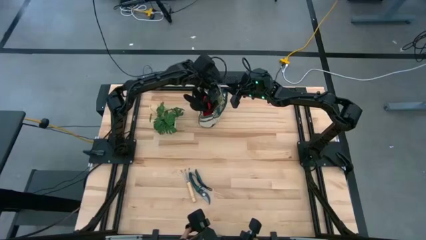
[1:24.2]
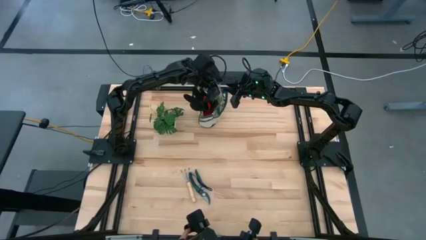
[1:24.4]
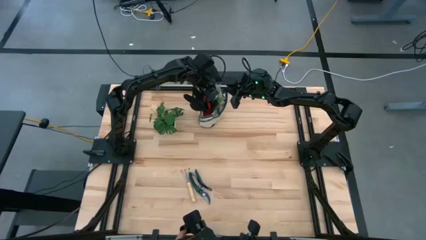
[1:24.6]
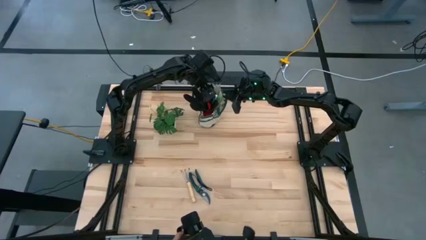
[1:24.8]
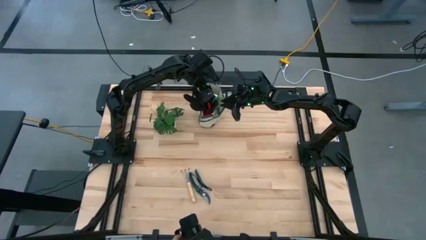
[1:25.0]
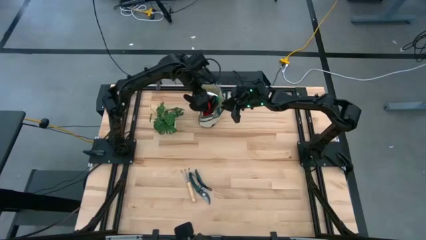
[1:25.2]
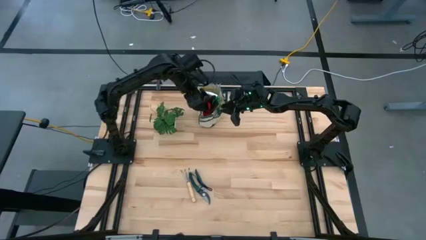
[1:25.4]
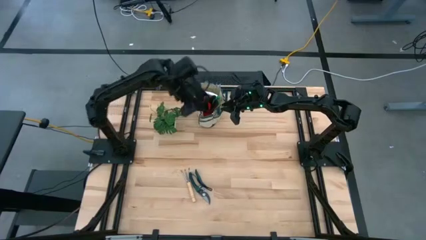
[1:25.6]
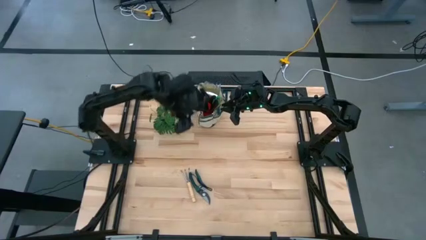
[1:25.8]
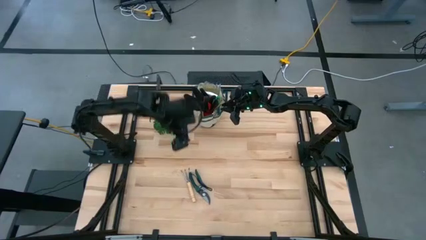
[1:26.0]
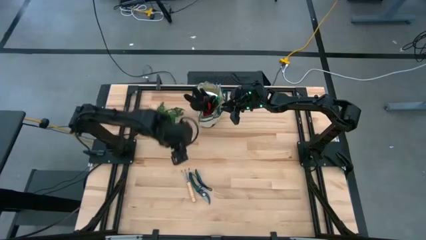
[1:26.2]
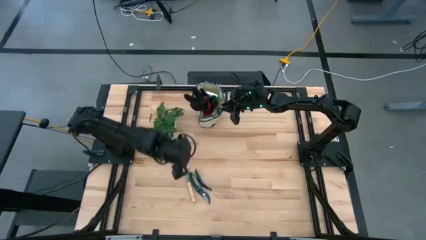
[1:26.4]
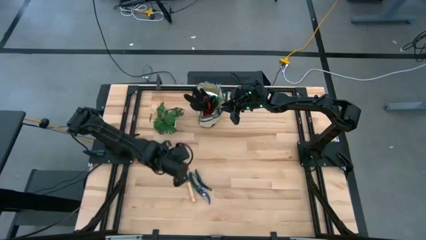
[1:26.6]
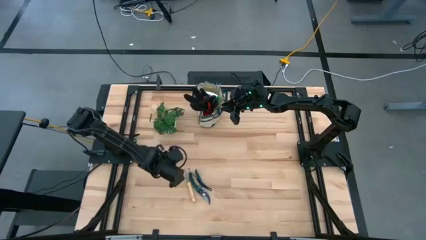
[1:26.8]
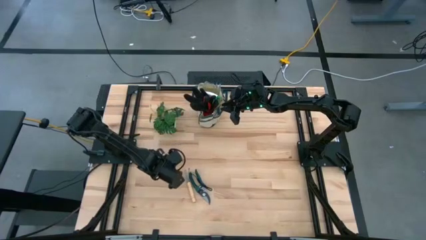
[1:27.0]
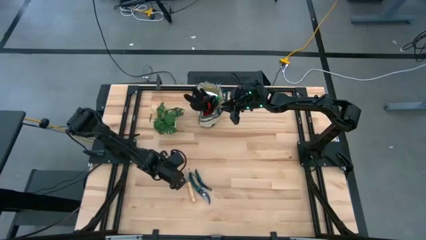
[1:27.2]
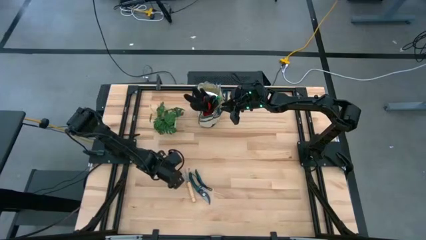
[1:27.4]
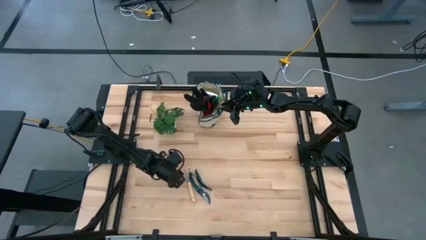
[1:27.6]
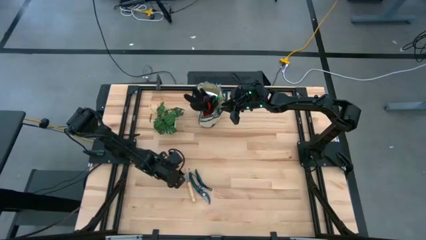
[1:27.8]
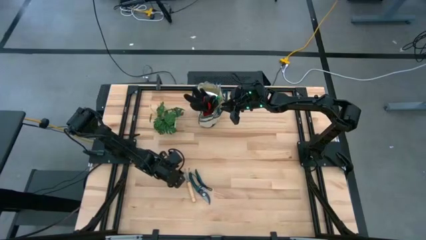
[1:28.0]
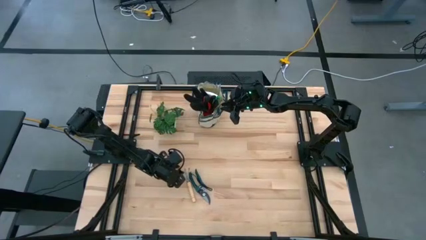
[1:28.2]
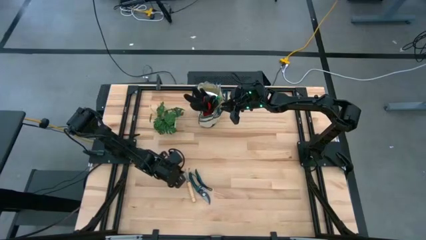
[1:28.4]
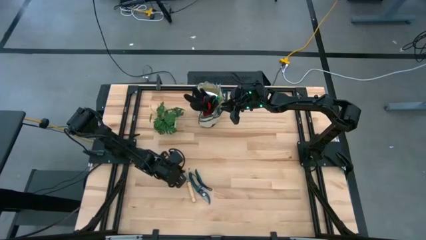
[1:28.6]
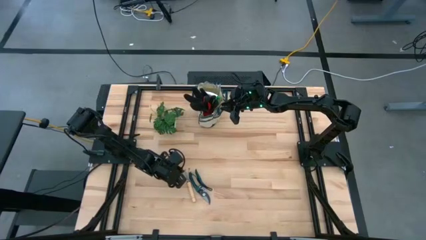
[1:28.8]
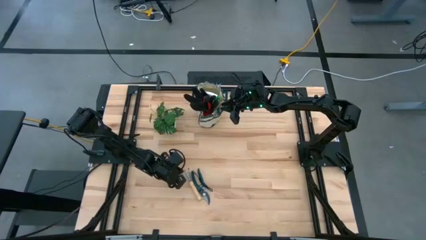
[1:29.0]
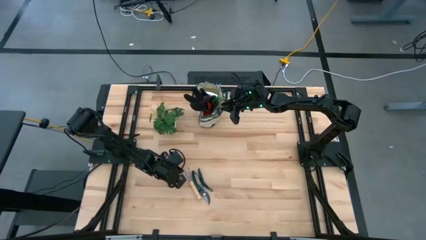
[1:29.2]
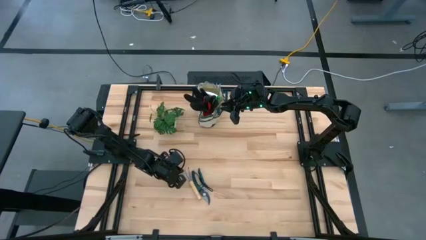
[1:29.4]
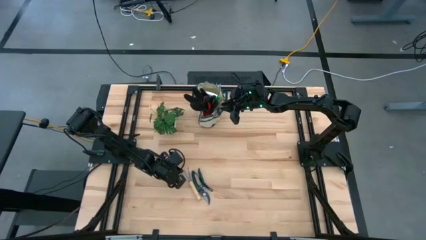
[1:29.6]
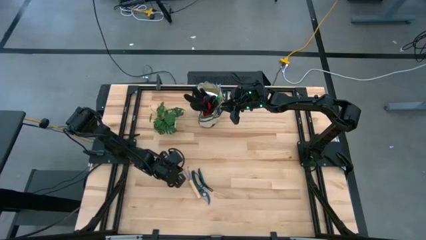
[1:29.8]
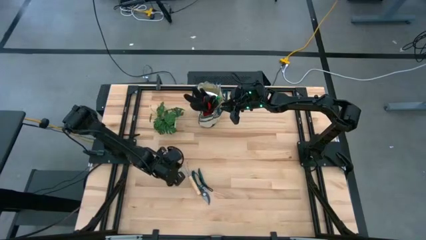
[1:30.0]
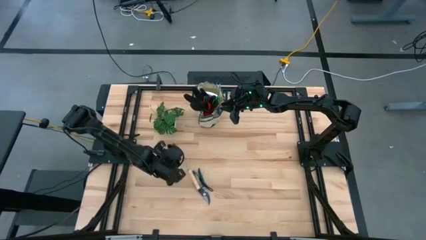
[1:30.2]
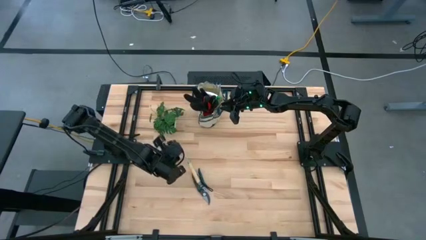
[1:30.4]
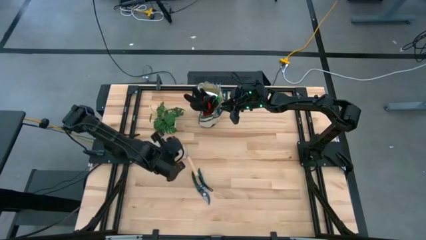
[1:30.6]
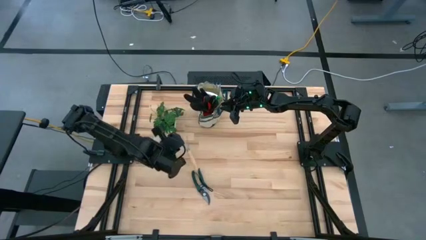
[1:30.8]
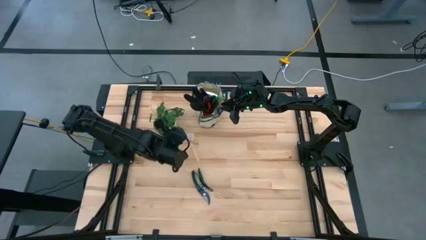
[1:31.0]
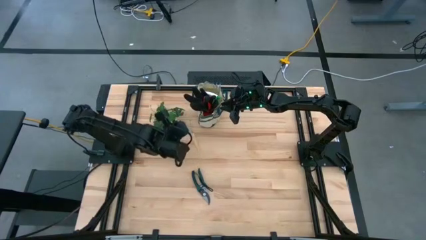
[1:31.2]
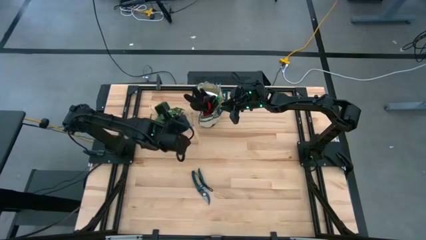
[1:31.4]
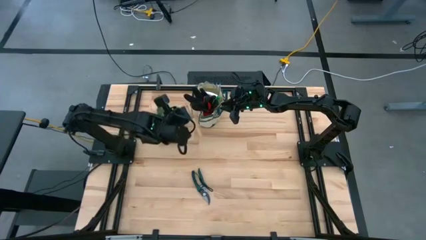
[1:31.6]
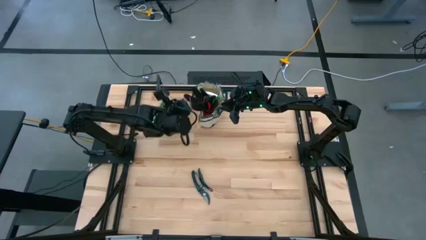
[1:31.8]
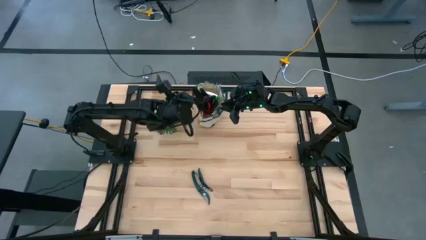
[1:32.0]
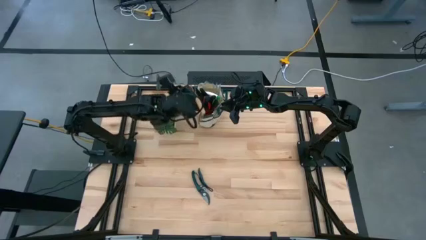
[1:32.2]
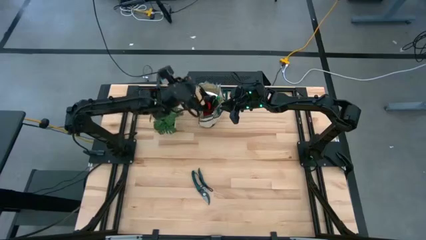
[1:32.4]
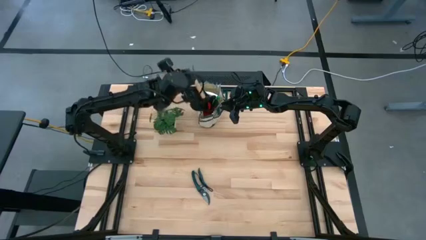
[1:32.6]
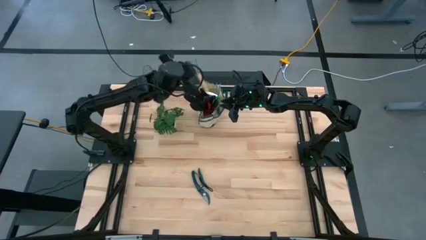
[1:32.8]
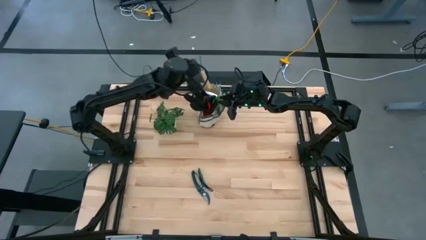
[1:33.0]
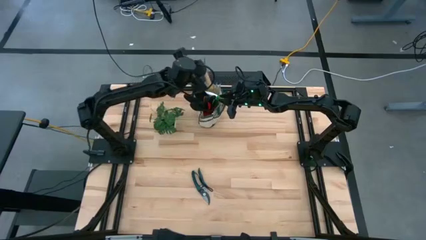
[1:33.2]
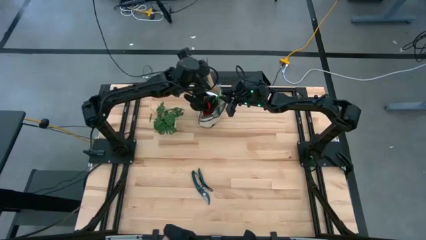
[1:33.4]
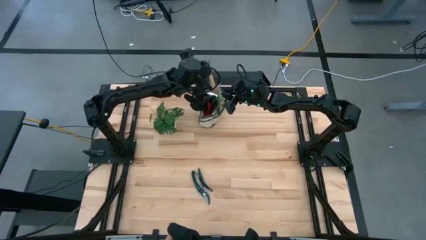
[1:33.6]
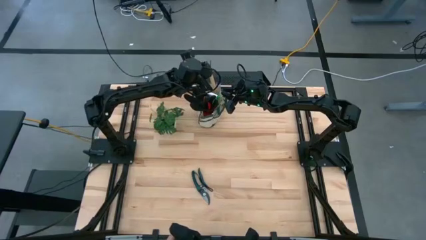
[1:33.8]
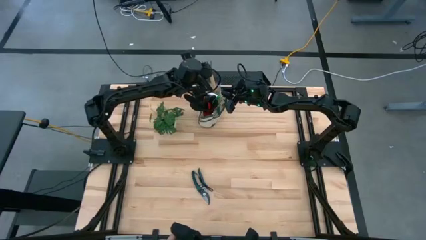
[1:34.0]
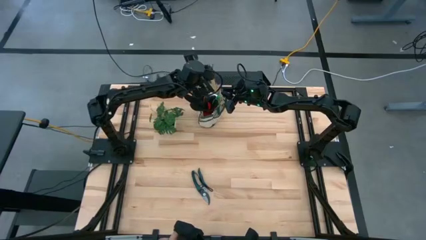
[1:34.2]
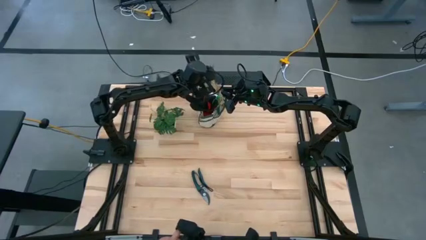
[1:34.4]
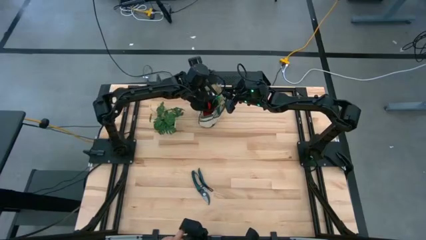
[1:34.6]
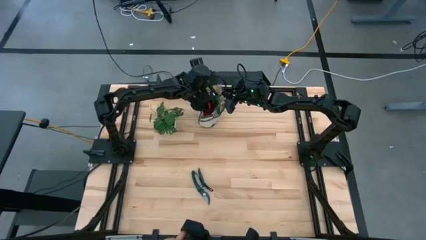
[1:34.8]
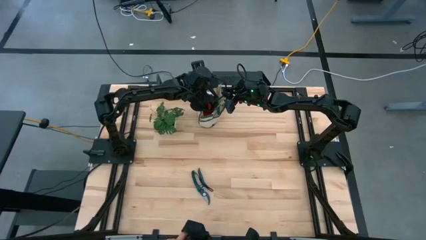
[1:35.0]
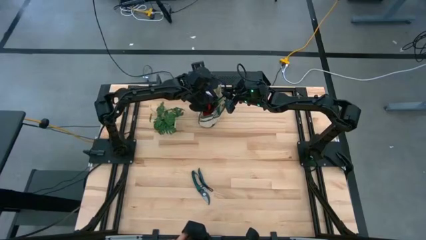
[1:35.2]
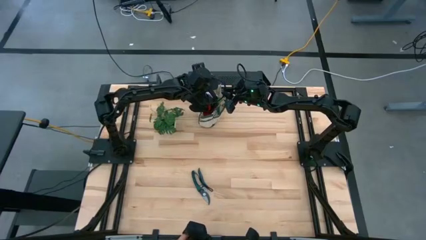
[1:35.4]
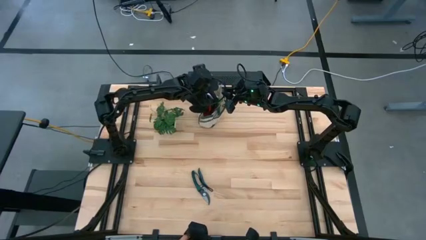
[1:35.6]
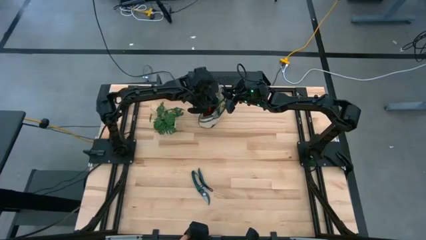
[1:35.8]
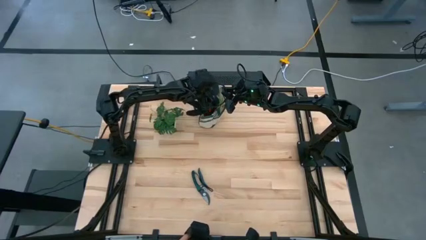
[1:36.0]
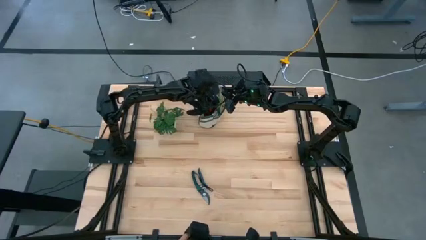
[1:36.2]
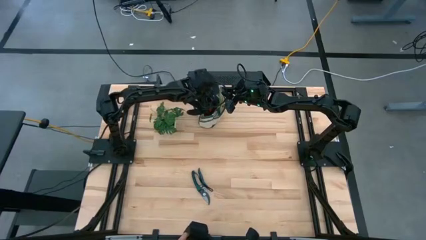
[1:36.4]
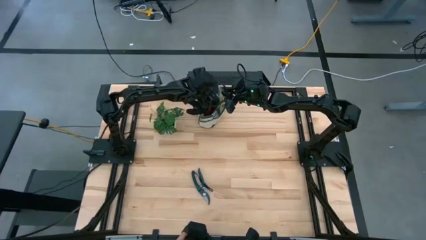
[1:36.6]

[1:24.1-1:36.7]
Task: Pick & Place Garden tools in Gardening bag
Put the brown hand rake into the white gardening bag
